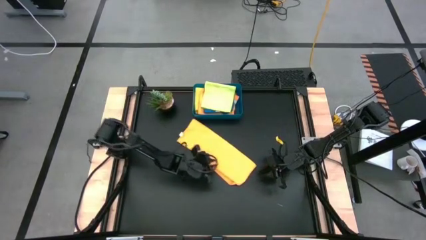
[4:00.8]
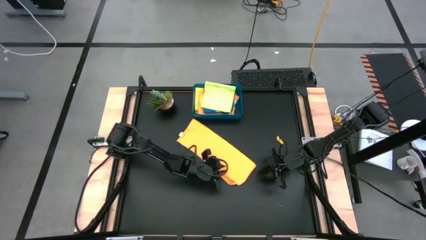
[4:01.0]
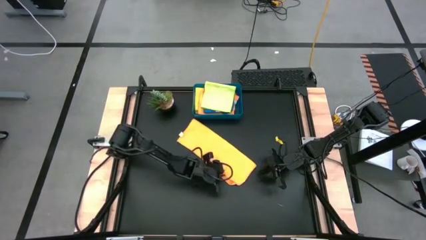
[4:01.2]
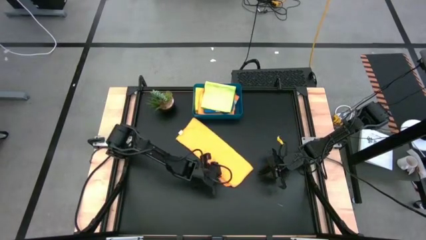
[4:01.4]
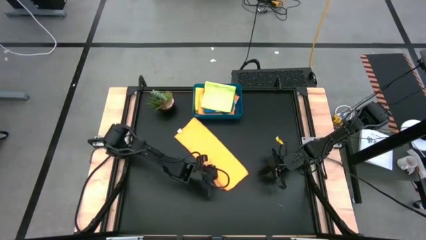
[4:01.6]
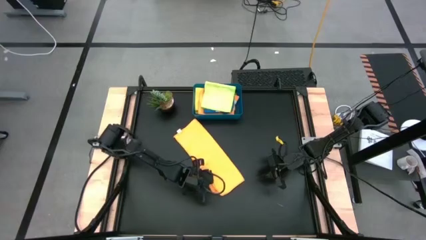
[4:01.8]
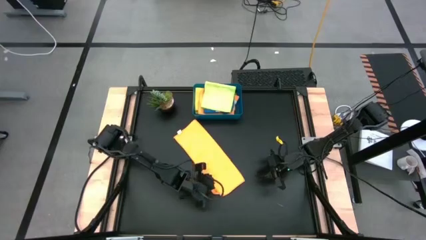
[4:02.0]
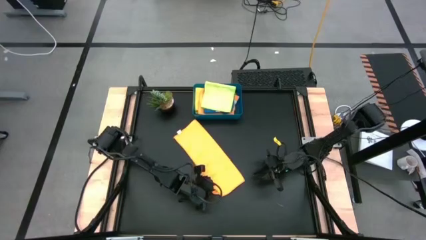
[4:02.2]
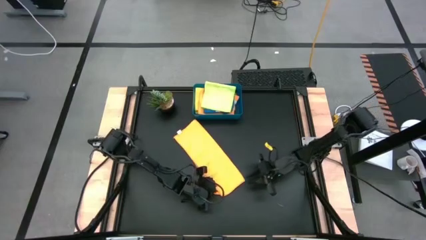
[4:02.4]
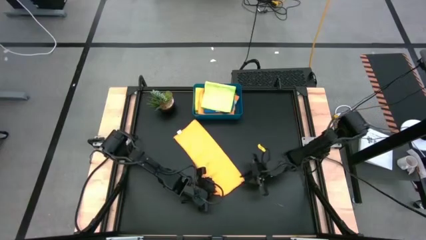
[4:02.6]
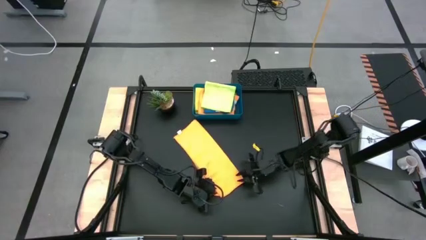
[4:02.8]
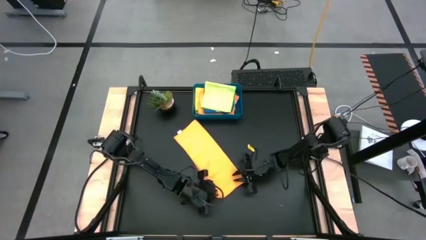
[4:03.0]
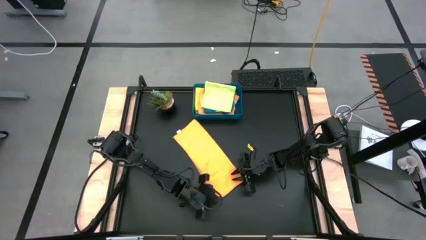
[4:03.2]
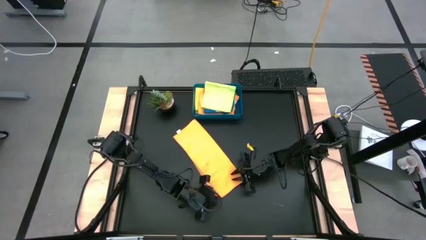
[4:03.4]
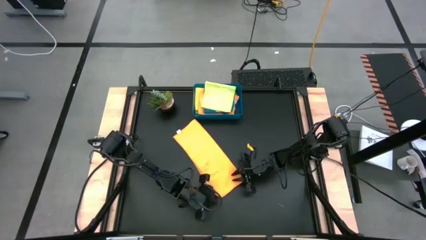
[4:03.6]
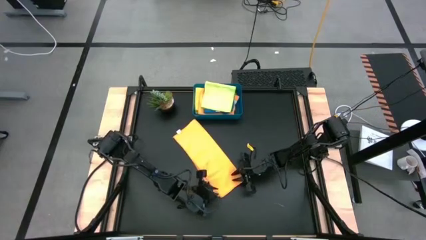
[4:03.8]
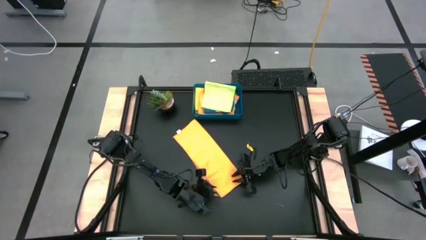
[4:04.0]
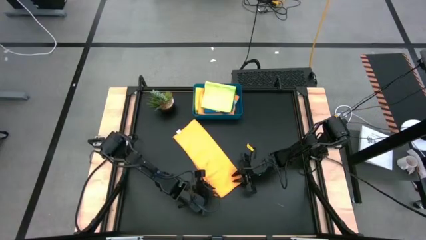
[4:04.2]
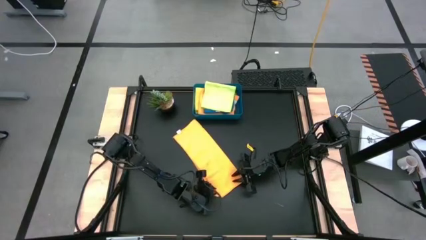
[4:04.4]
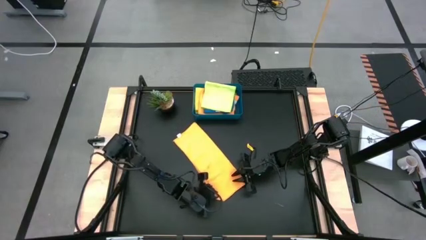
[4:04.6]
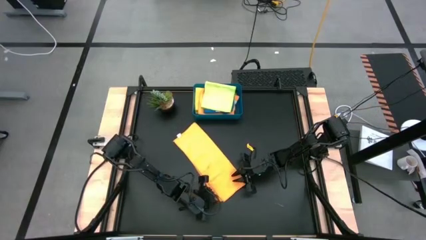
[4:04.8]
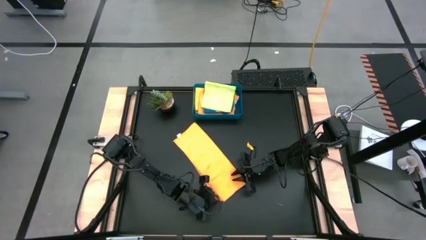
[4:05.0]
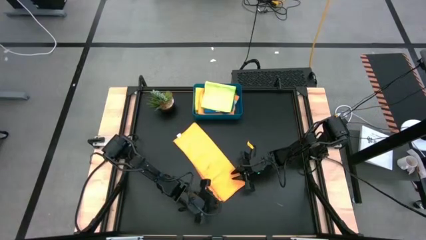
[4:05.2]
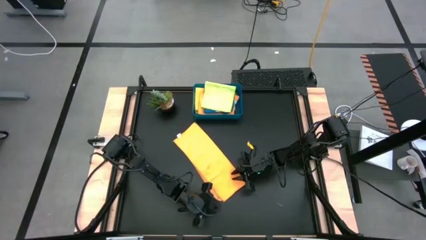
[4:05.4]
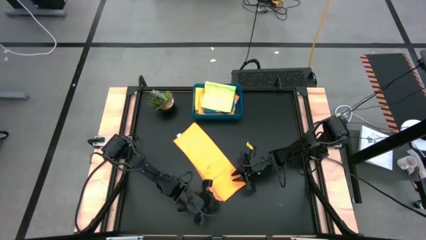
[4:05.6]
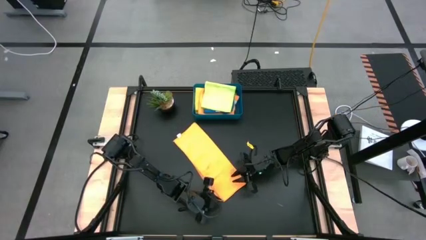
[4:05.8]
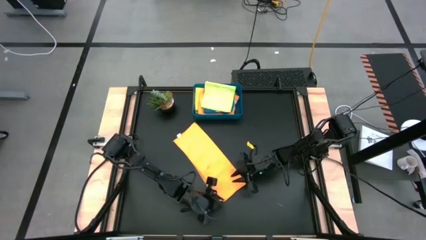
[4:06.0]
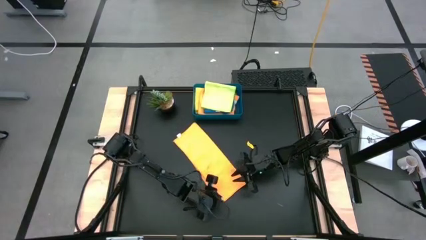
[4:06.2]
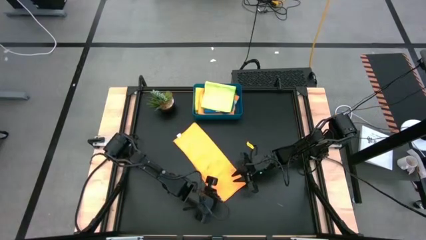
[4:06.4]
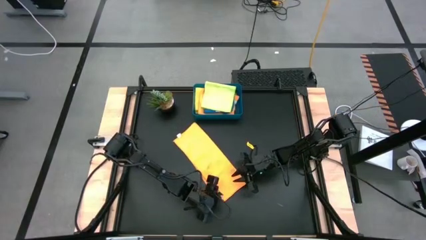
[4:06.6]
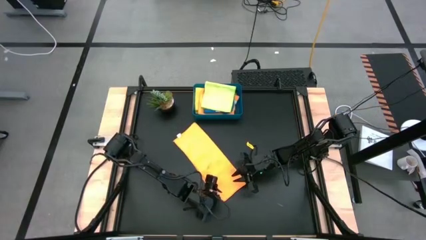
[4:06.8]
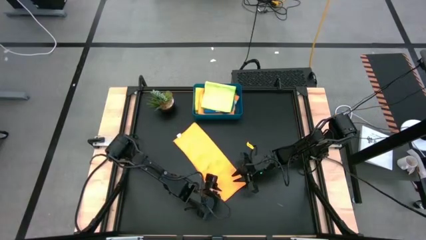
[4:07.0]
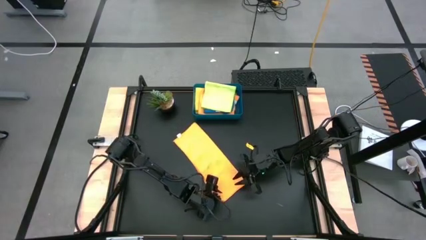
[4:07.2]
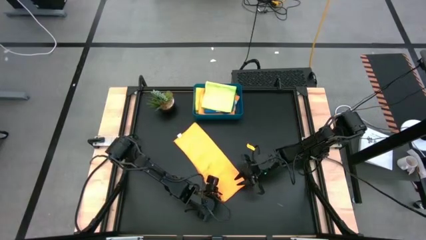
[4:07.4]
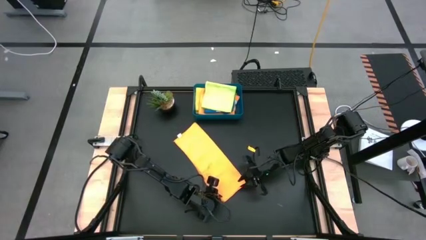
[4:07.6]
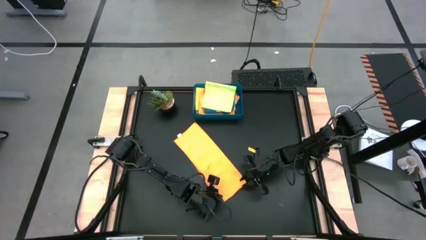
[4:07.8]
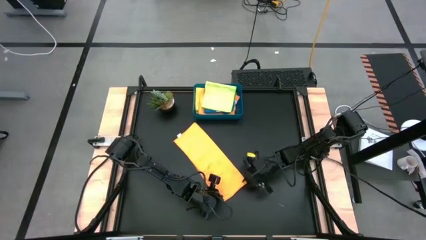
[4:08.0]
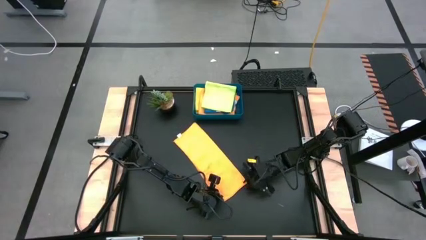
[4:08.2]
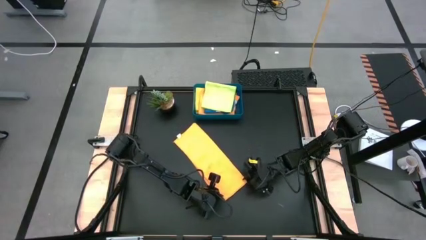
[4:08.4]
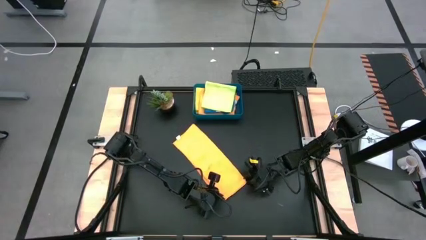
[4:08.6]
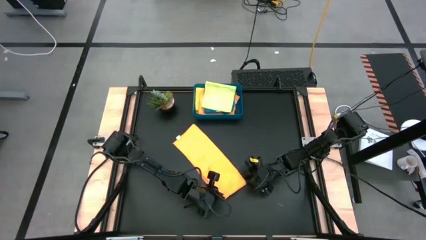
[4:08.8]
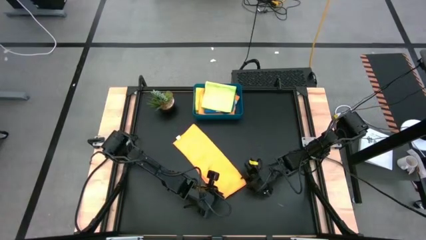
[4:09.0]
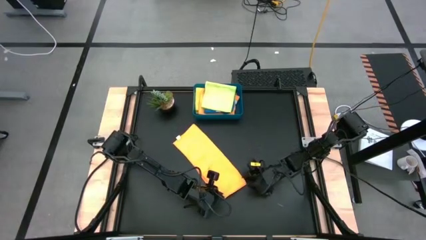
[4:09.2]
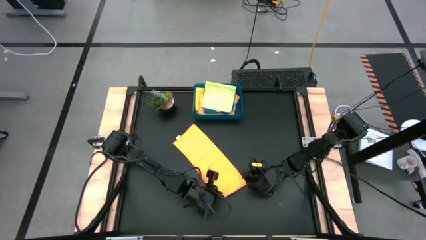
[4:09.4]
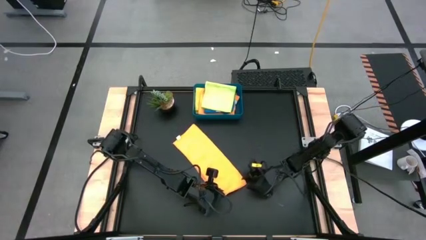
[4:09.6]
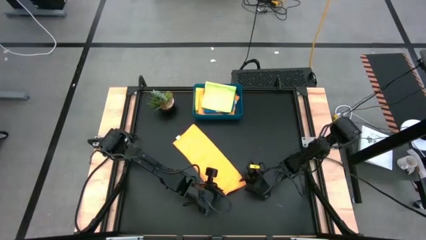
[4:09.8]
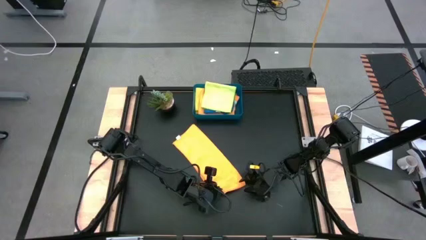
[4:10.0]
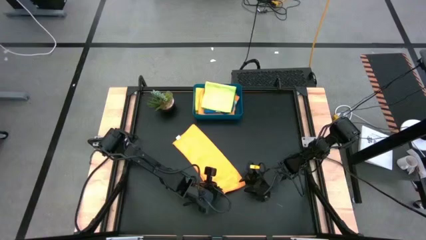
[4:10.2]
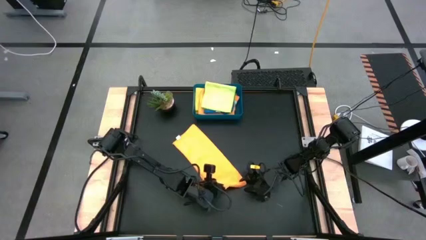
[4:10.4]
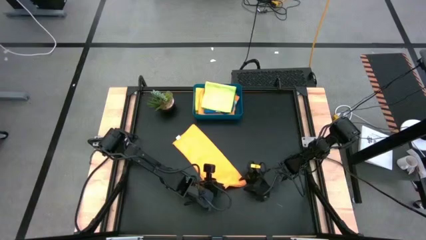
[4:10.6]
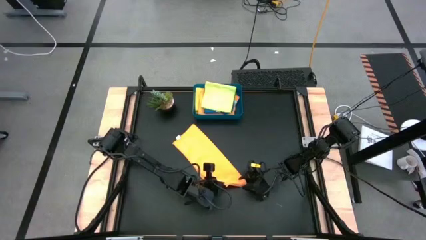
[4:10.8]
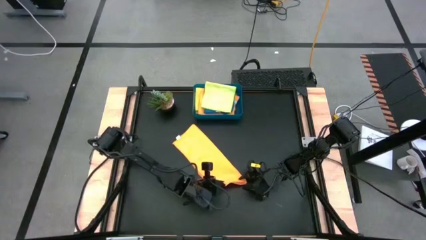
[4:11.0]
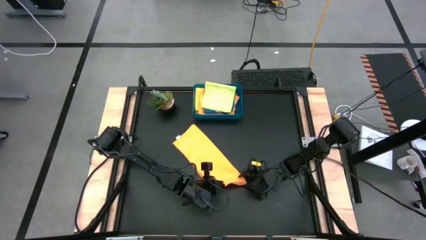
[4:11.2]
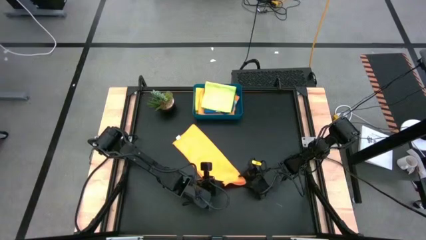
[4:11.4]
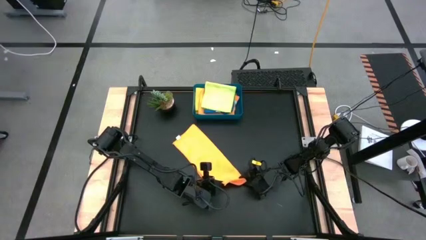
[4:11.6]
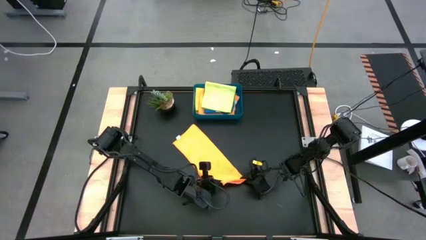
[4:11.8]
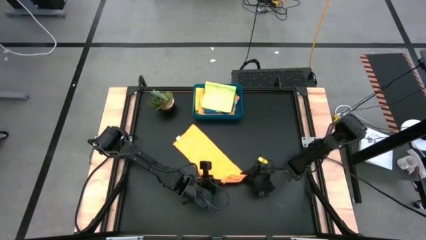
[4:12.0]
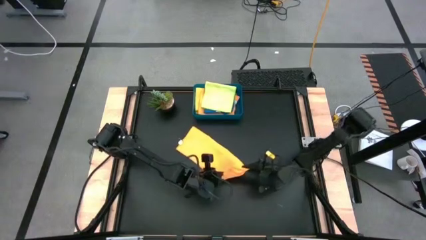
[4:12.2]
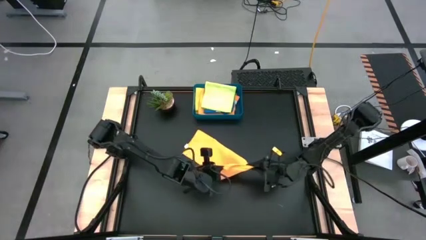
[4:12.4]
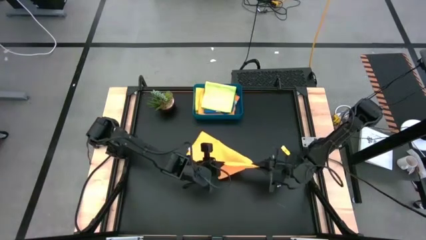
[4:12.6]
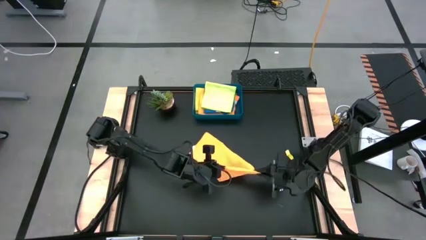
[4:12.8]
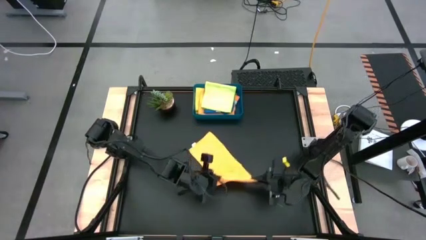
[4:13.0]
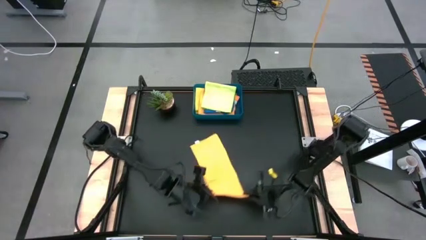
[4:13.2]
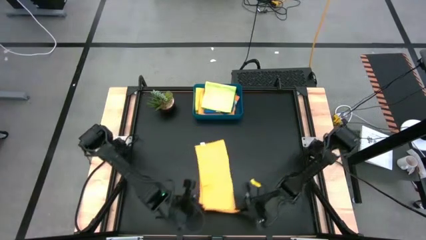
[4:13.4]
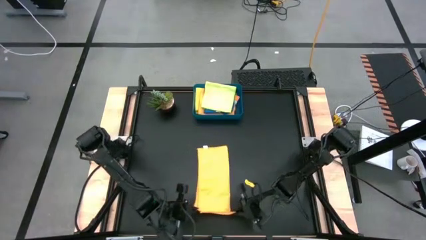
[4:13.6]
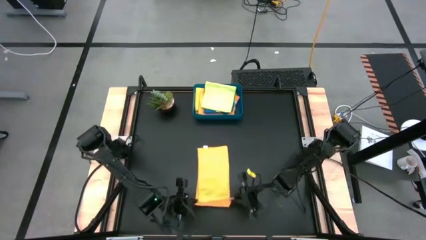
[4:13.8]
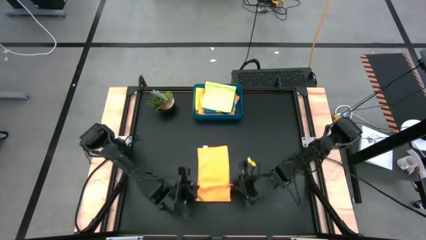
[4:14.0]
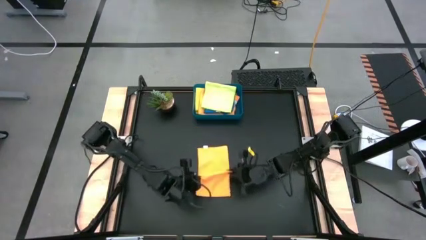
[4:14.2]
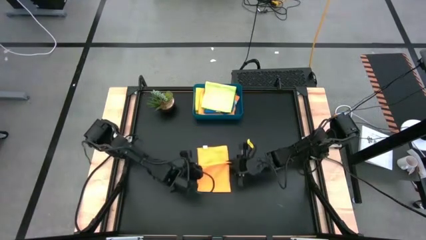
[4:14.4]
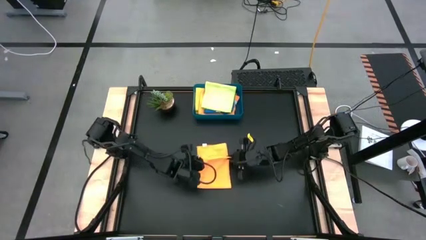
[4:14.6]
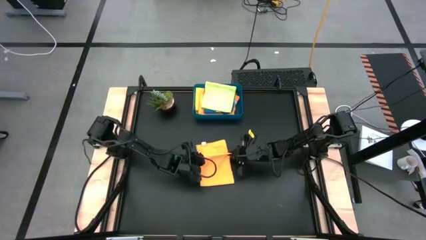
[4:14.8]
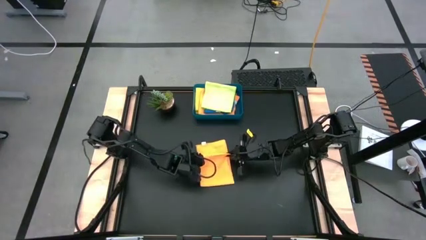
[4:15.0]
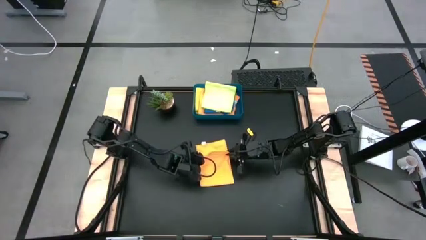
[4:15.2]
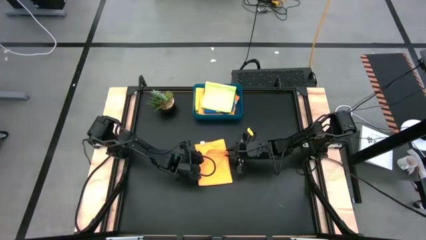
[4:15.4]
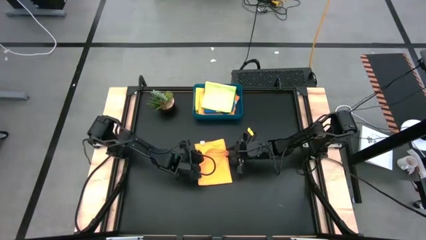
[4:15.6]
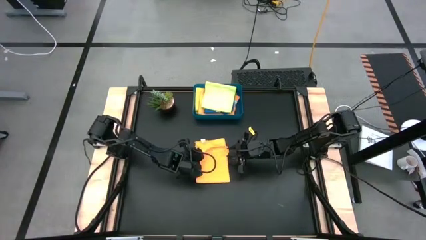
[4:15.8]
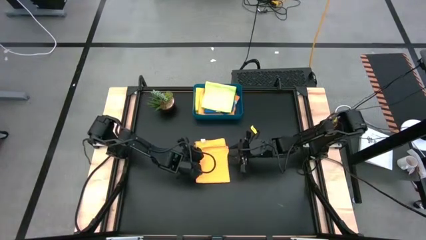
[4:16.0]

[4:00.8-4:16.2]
Task: Fold microfiber towels
Fold the orange microfiber cloth

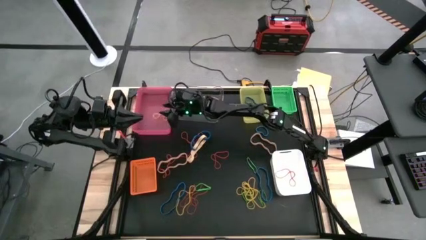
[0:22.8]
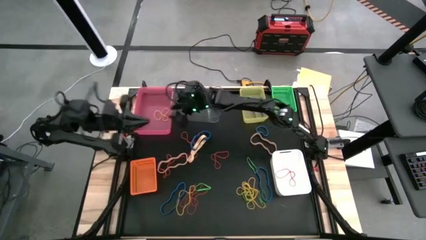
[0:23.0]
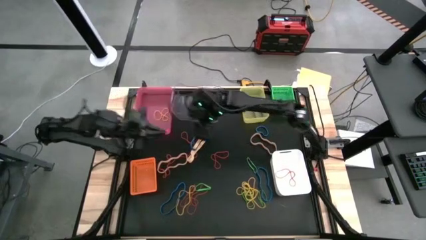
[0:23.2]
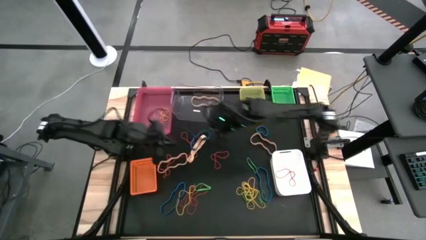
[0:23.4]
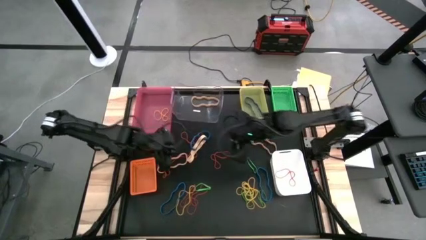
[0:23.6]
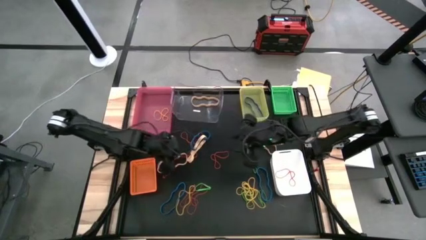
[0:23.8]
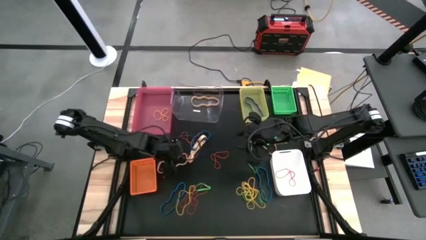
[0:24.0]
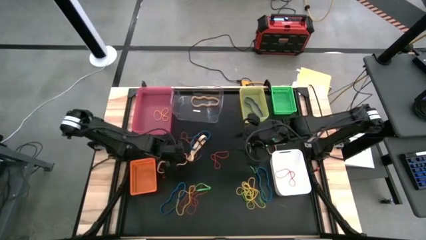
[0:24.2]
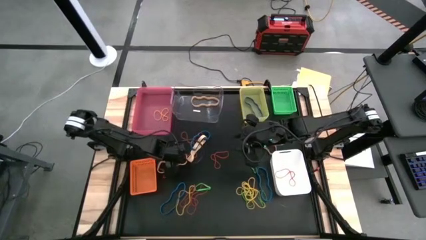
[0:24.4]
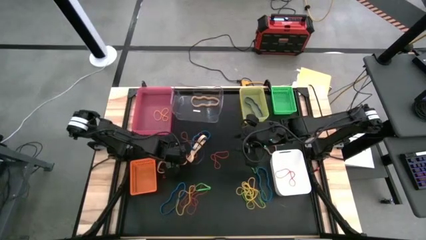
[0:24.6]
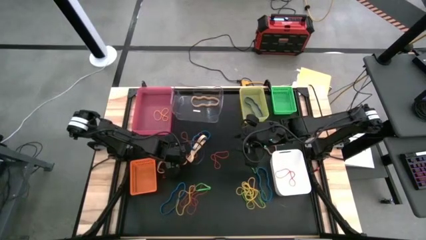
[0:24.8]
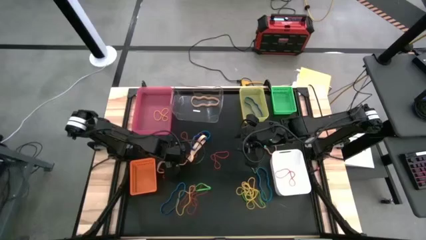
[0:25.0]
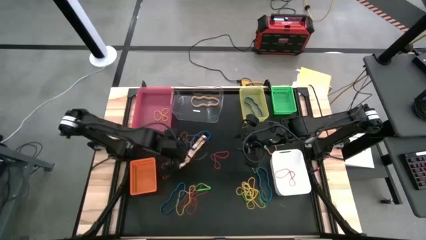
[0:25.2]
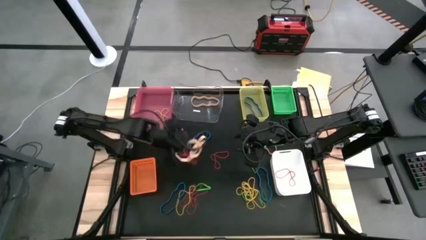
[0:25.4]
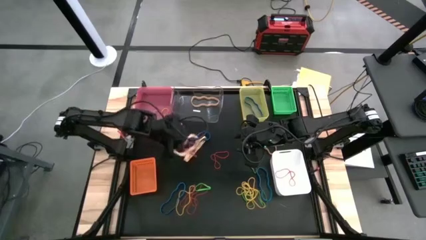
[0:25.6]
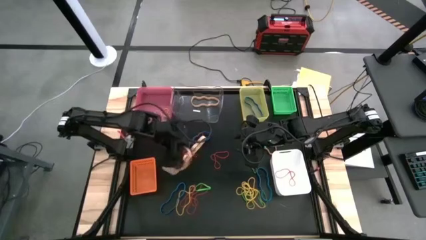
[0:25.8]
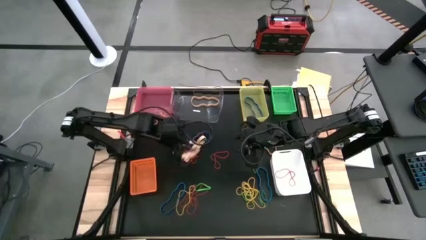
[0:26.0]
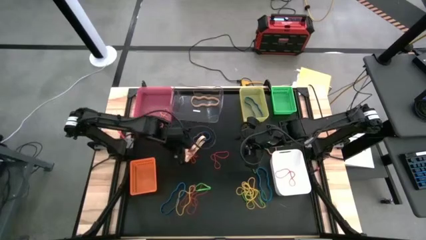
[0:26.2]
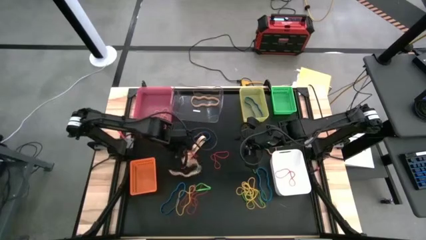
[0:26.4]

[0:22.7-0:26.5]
Task: Sort rubber bands into baskets
Put the brown rubber band into the transparent bin
